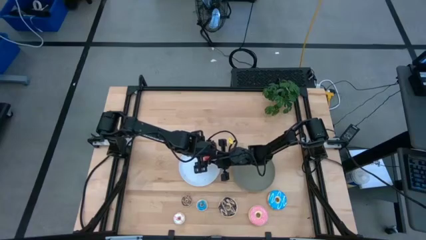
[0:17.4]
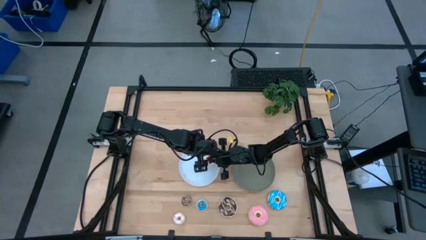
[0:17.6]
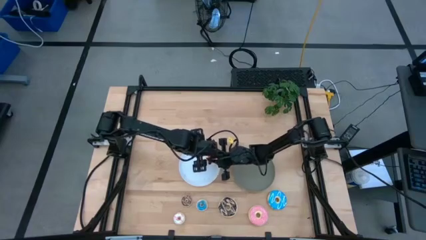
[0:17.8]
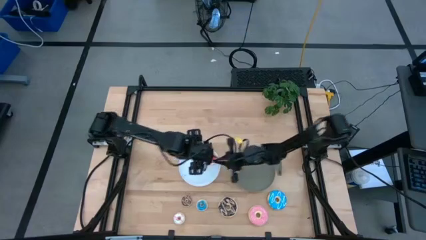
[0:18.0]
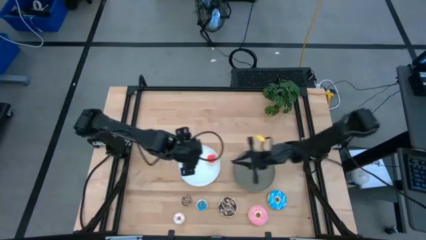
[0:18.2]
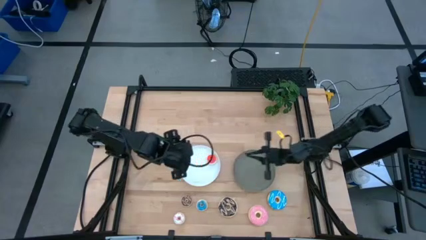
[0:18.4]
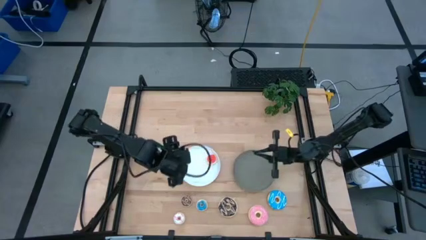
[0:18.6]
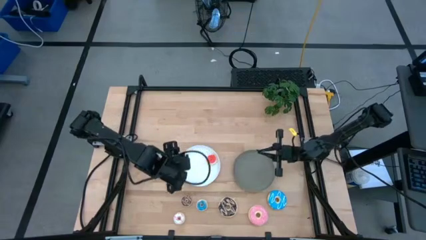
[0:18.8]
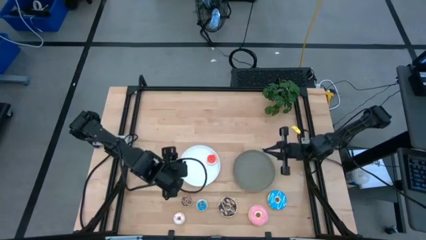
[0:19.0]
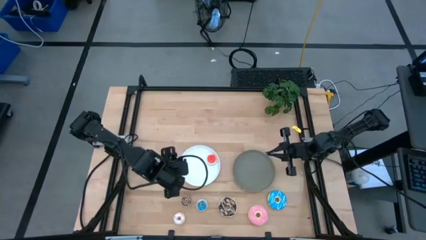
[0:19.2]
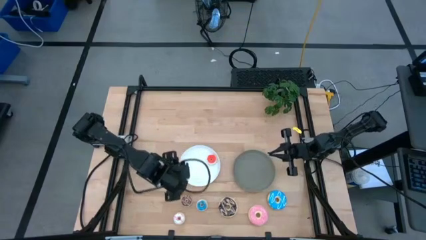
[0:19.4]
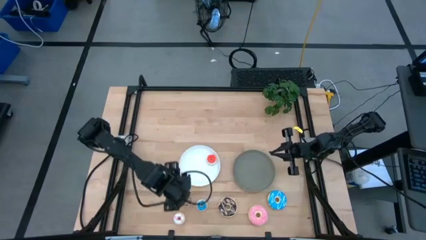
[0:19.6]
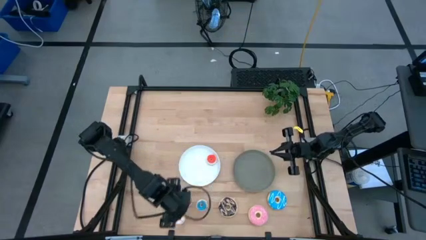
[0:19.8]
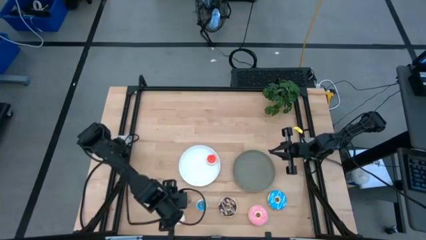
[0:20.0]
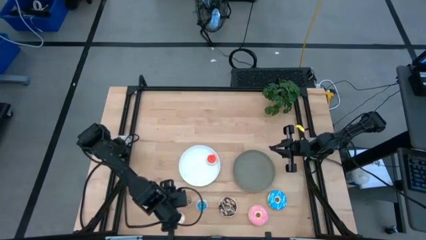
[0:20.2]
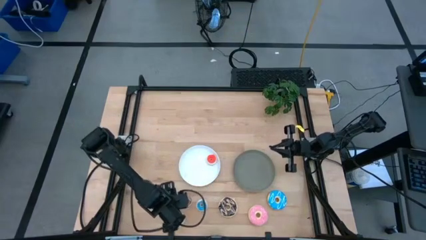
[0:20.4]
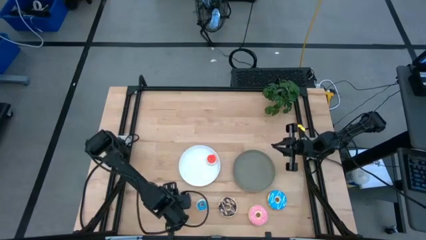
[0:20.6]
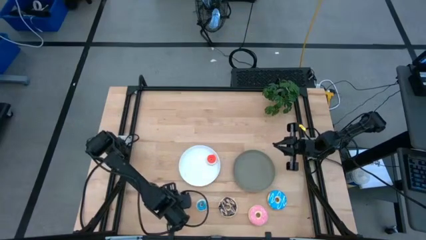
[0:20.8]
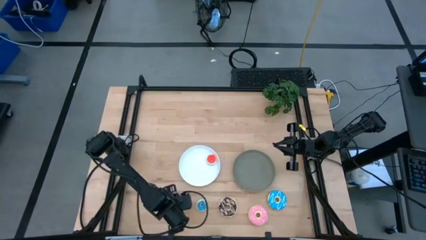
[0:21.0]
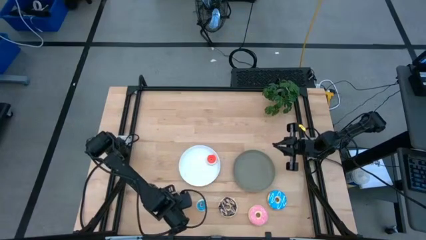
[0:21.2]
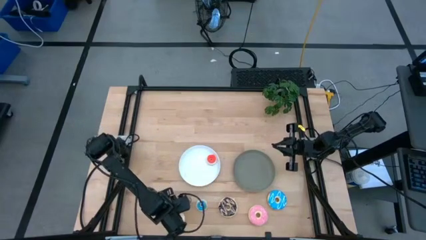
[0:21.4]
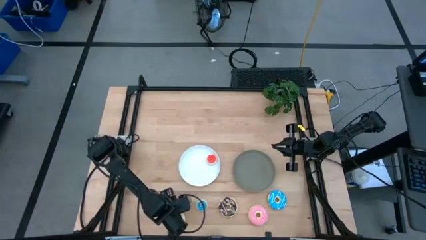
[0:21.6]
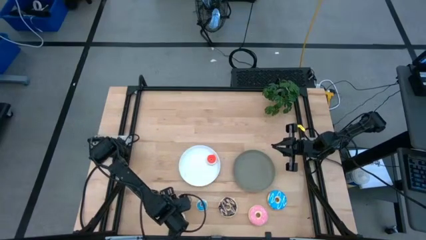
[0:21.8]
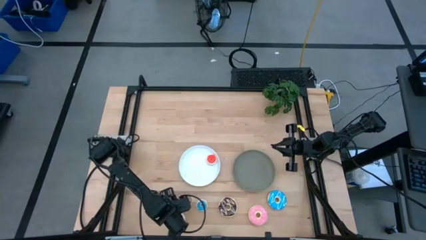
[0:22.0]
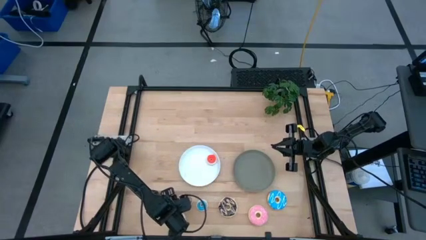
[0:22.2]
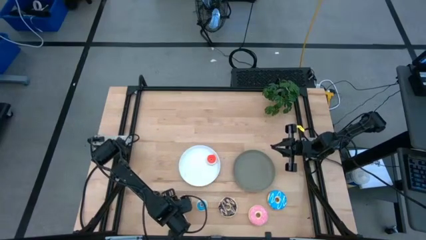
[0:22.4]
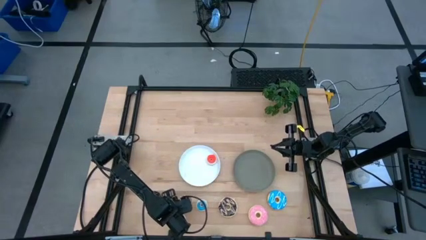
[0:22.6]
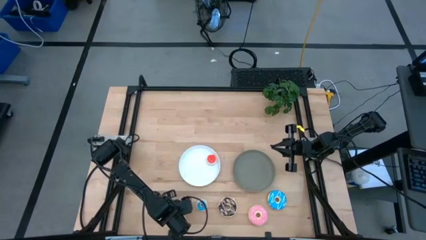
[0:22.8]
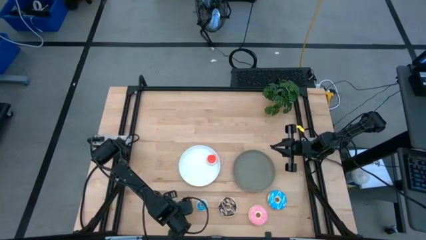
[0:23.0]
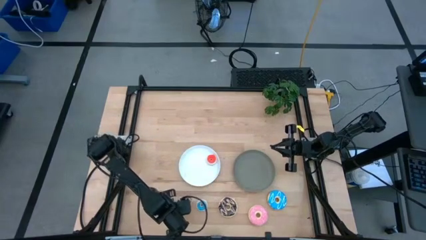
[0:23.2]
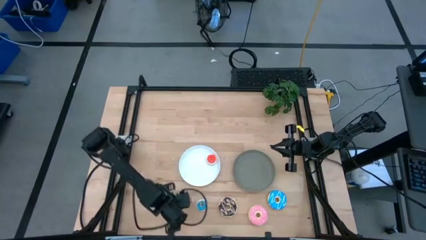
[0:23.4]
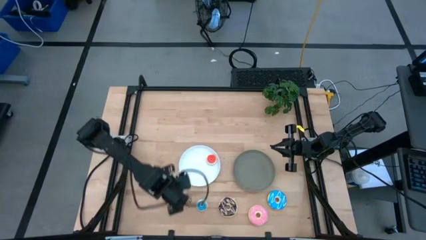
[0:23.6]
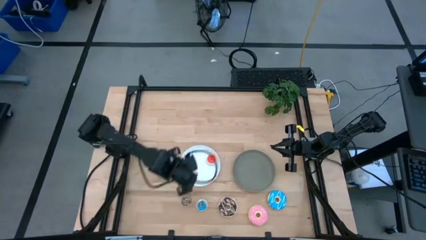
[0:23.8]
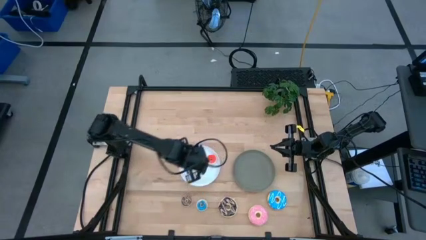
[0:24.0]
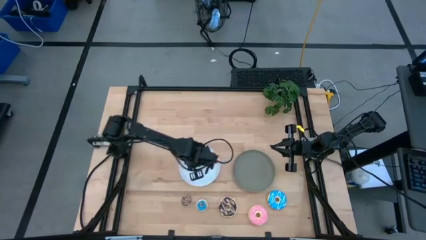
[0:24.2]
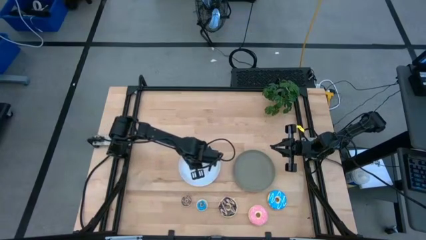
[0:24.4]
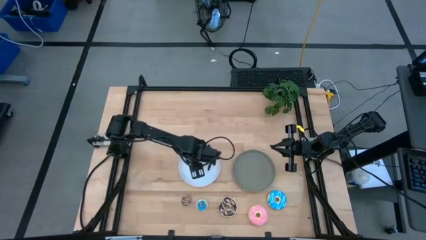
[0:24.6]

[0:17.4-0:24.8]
Task: Pick & Place donuts
Put the small white donut on the white plate

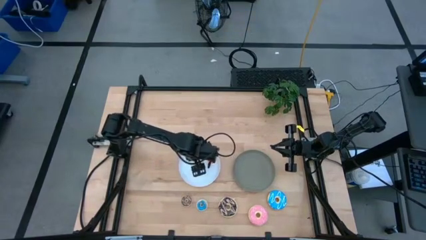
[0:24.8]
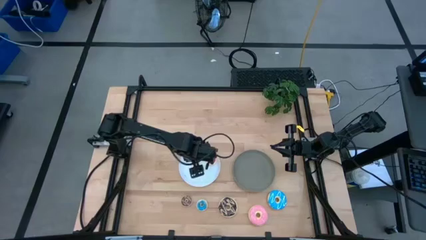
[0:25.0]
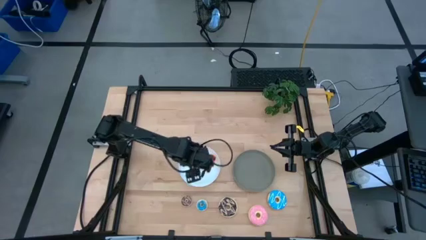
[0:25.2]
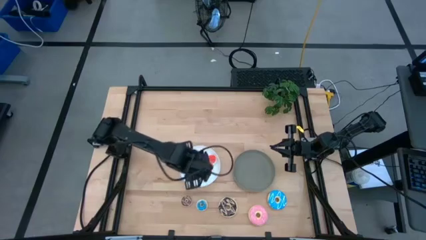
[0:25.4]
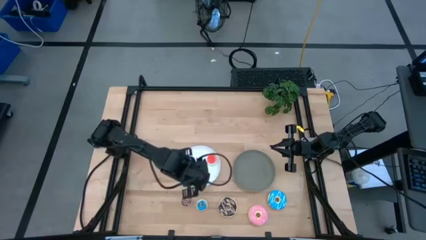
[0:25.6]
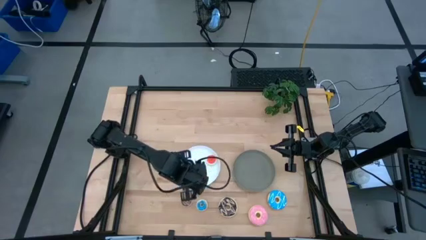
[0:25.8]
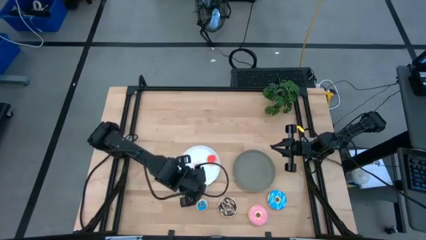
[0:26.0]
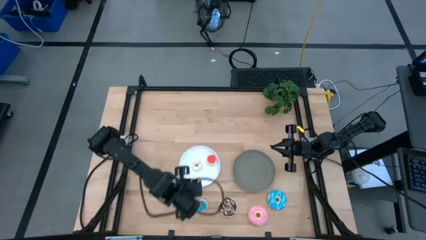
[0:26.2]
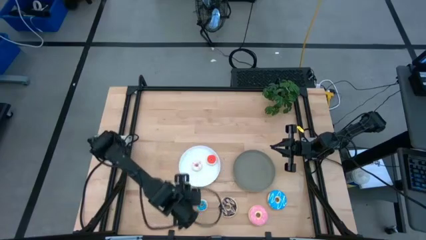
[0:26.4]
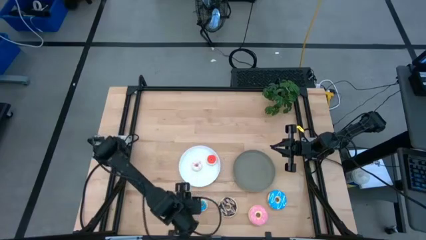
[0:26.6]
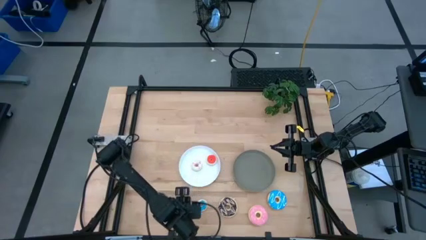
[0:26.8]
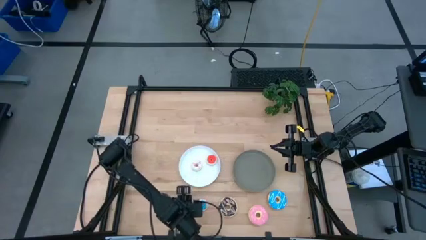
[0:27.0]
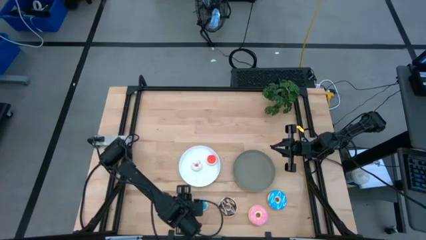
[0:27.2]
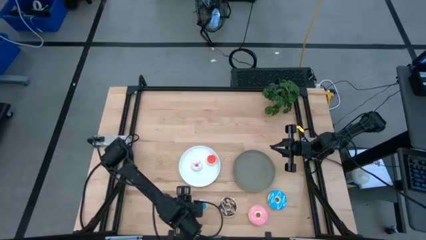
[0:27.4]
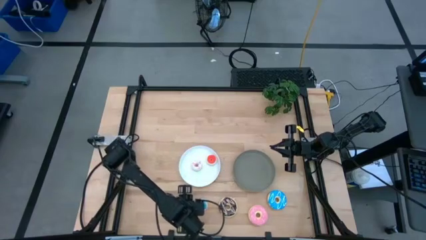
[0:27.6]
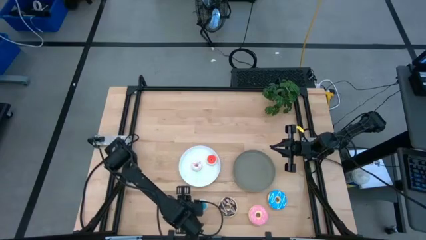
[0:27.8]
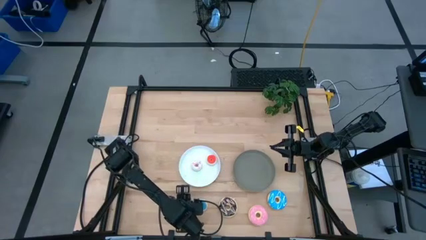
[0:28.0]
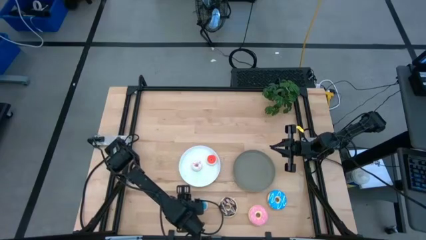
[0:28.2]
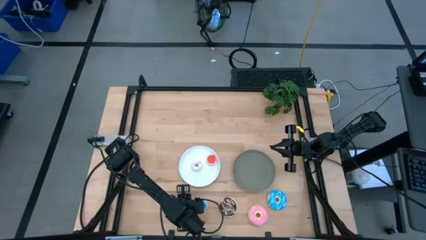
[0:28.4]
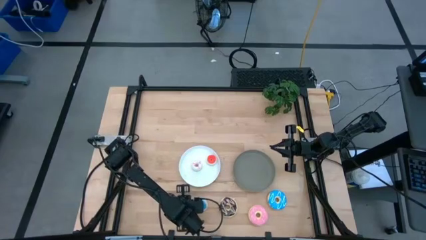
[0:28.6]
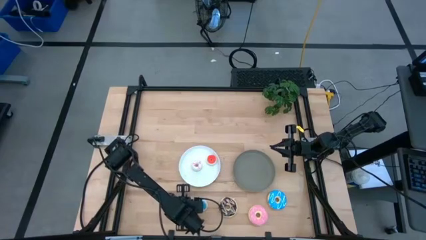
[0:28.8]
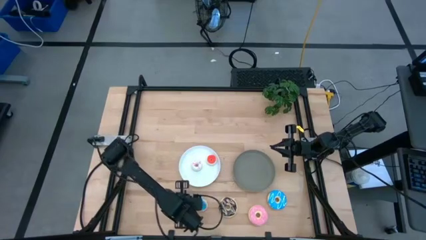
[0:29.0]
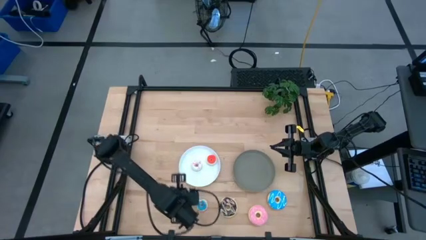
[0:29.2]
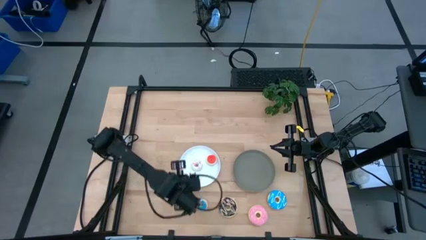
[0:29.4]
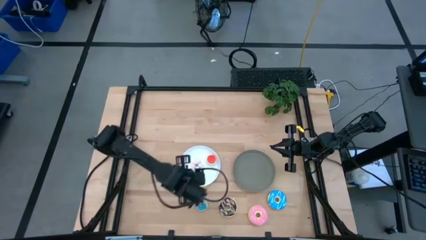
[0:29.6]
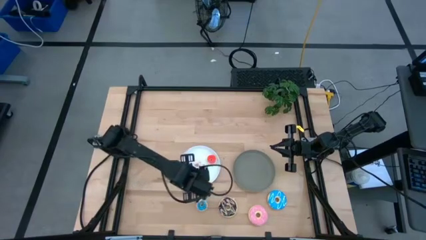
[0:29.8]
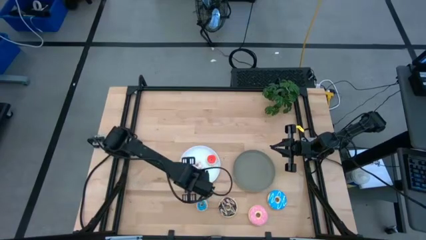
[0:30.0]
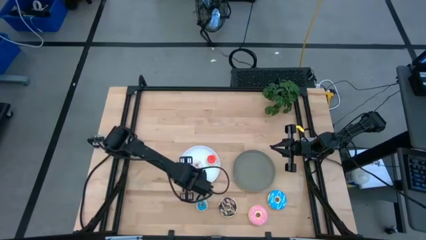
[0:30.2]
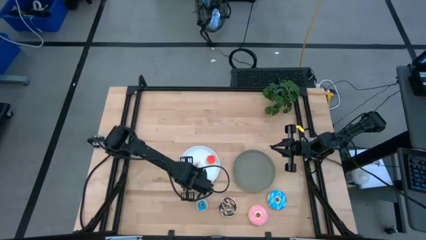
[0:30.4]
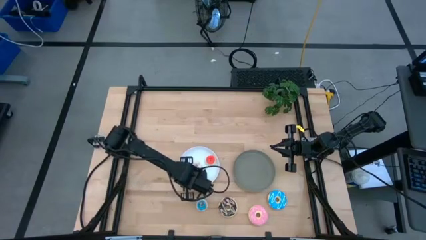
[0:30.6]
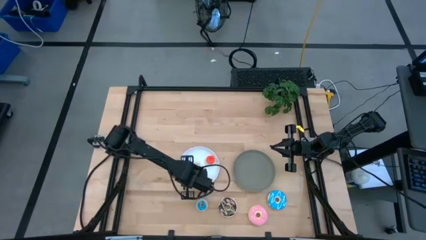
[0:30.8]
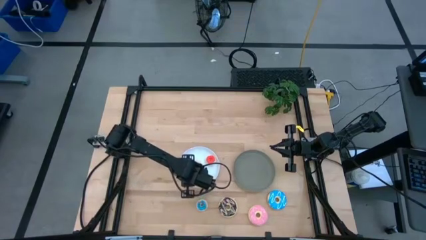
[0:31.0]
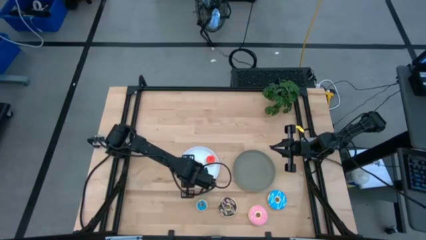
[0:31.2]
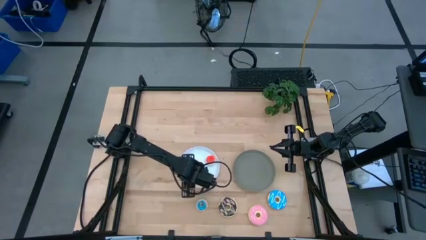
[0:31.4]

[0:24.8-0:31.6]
Put the small brown donut on the white plate
